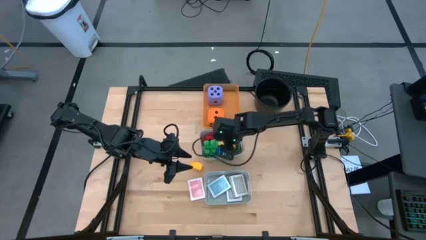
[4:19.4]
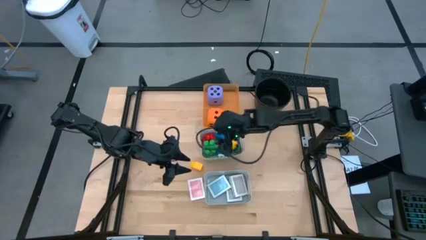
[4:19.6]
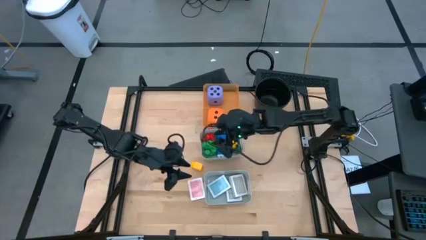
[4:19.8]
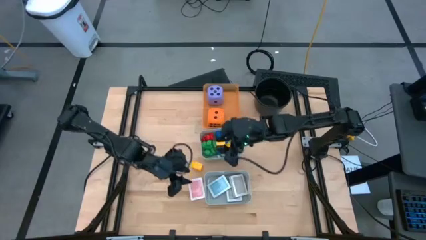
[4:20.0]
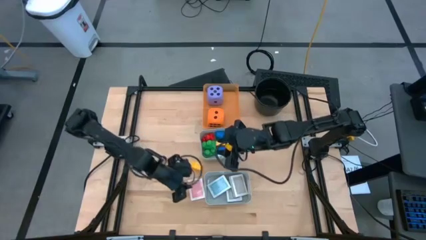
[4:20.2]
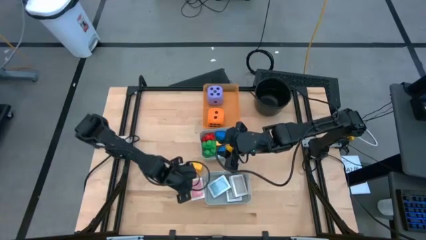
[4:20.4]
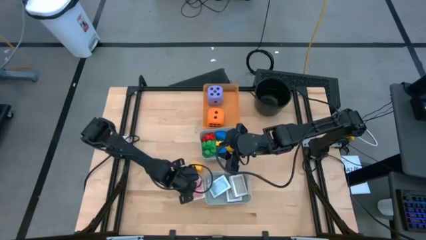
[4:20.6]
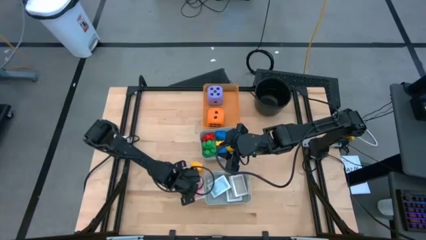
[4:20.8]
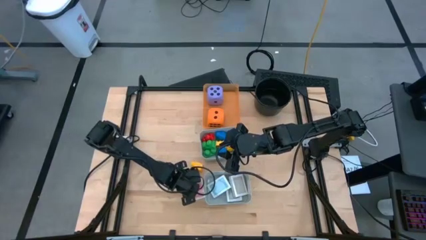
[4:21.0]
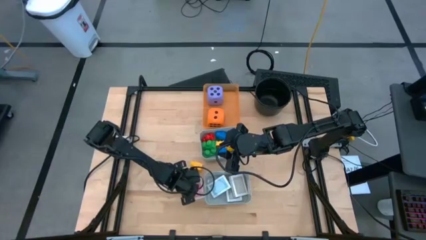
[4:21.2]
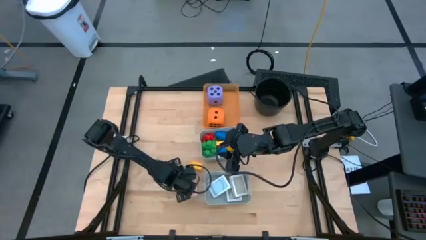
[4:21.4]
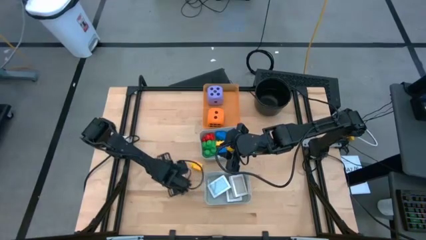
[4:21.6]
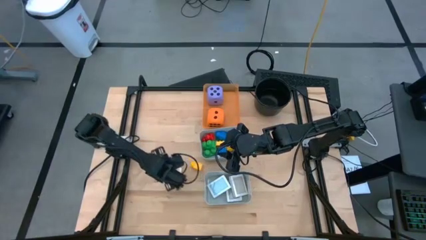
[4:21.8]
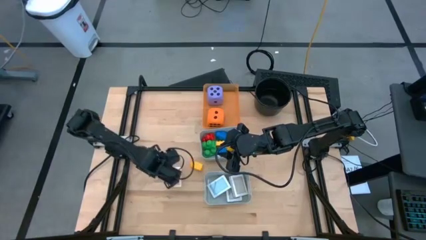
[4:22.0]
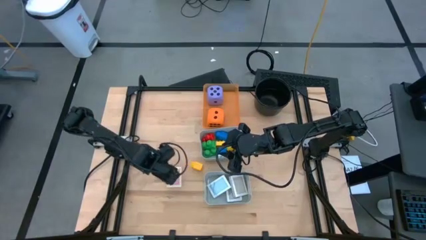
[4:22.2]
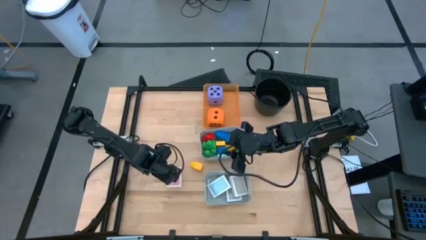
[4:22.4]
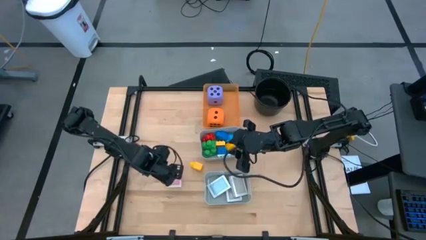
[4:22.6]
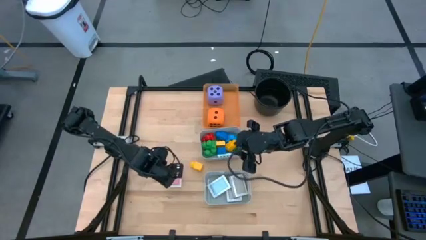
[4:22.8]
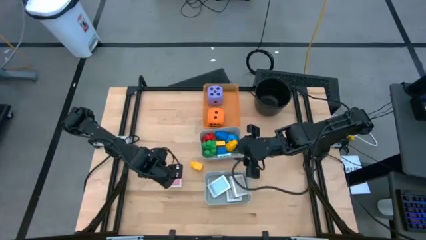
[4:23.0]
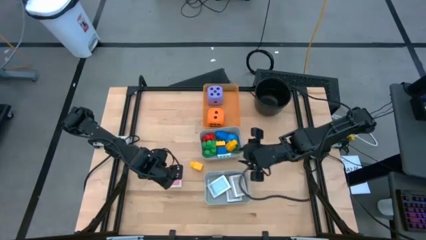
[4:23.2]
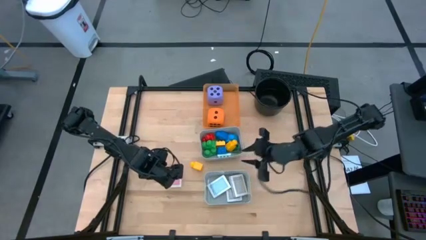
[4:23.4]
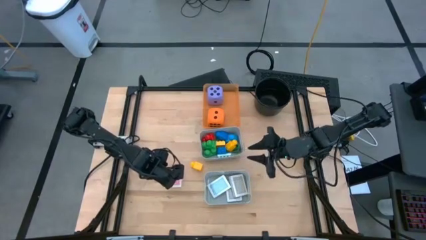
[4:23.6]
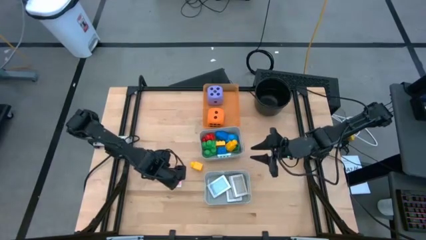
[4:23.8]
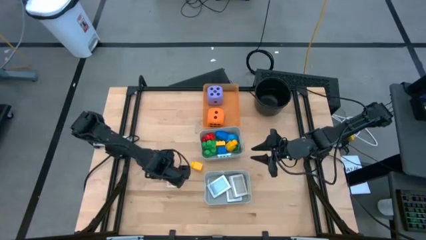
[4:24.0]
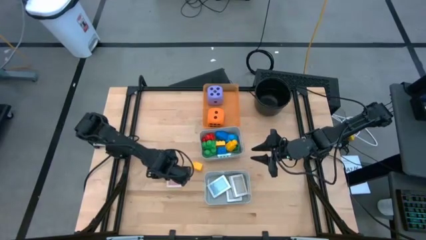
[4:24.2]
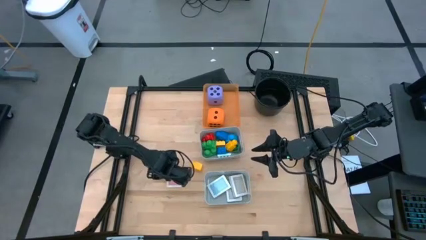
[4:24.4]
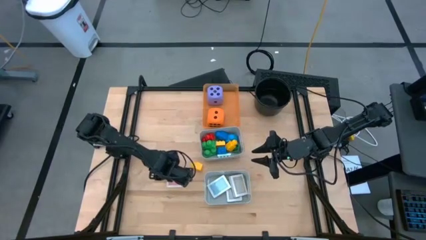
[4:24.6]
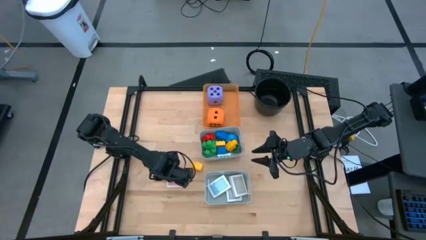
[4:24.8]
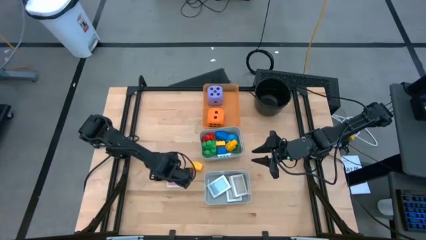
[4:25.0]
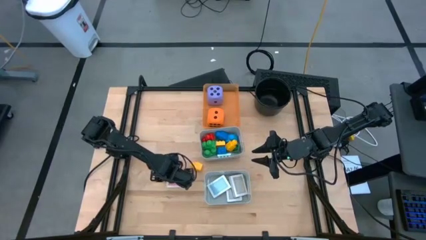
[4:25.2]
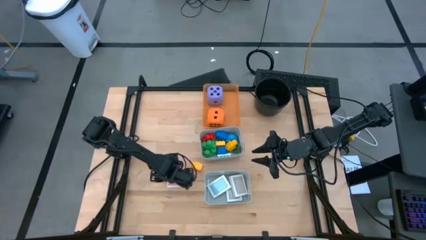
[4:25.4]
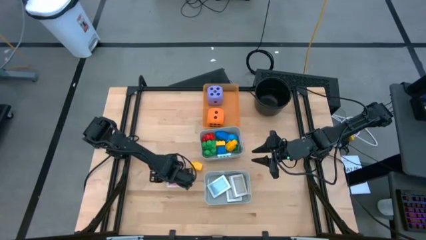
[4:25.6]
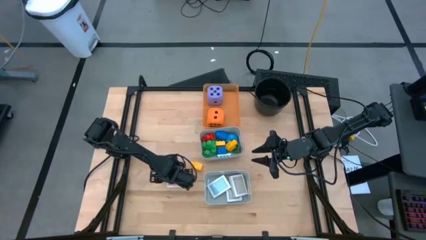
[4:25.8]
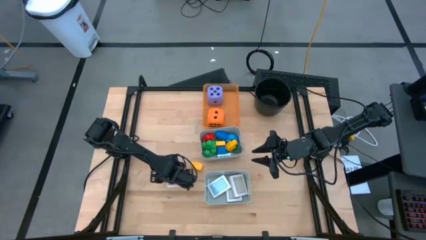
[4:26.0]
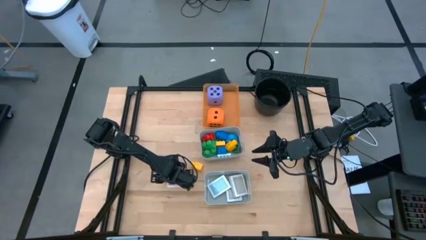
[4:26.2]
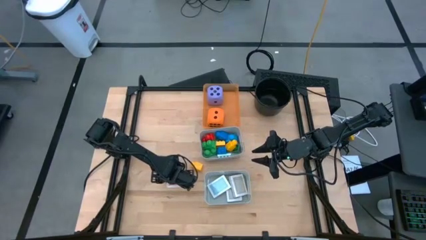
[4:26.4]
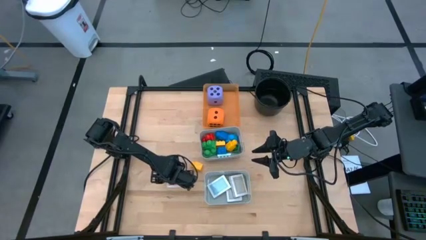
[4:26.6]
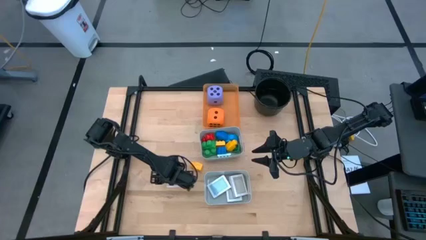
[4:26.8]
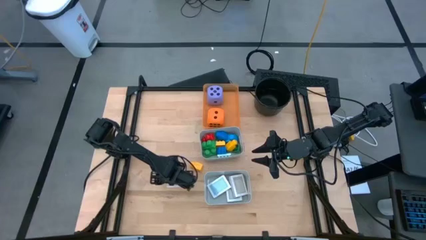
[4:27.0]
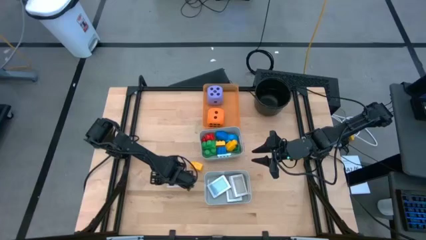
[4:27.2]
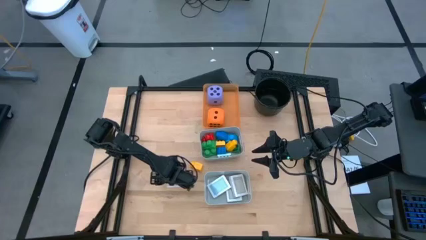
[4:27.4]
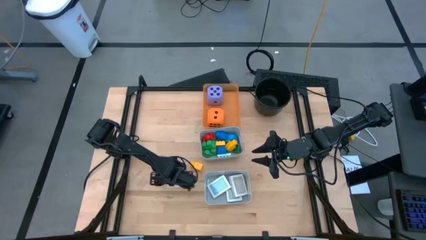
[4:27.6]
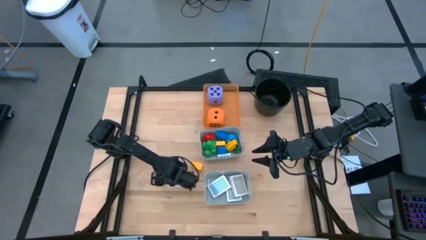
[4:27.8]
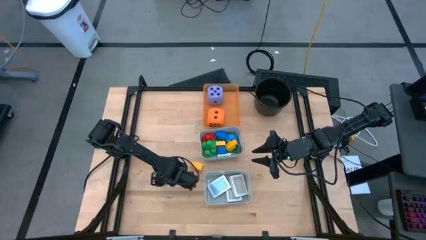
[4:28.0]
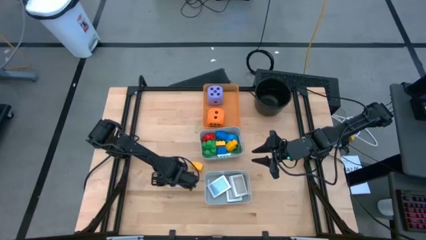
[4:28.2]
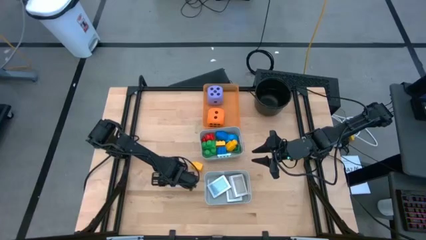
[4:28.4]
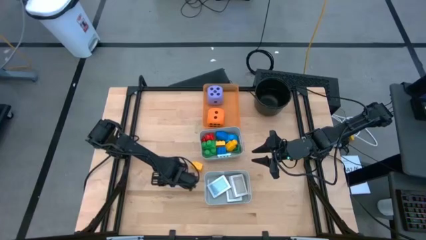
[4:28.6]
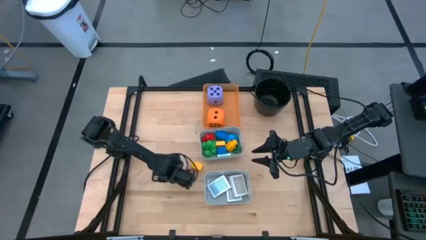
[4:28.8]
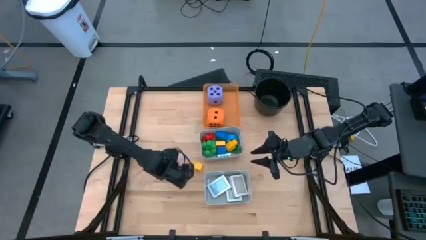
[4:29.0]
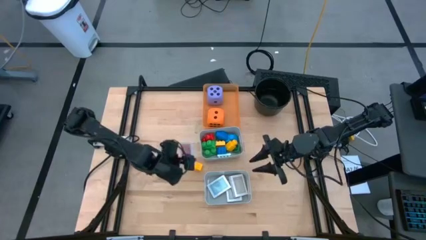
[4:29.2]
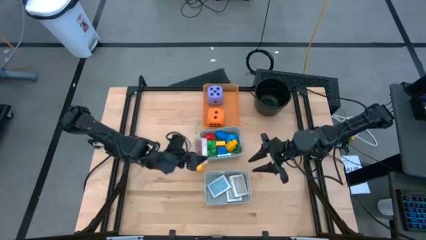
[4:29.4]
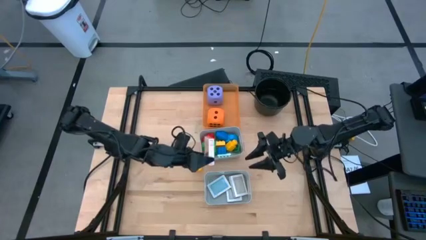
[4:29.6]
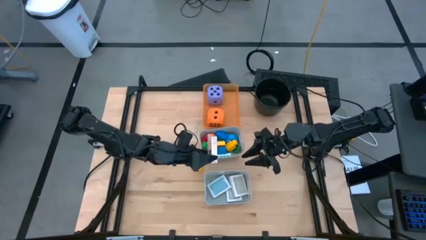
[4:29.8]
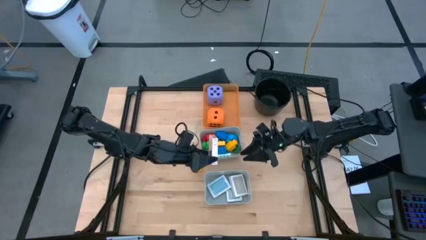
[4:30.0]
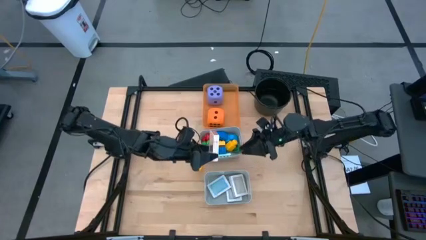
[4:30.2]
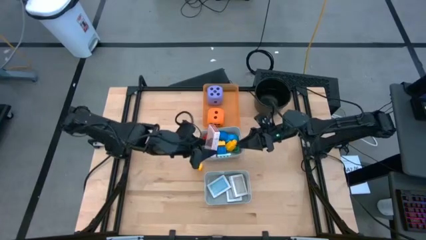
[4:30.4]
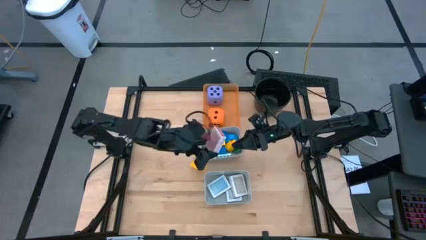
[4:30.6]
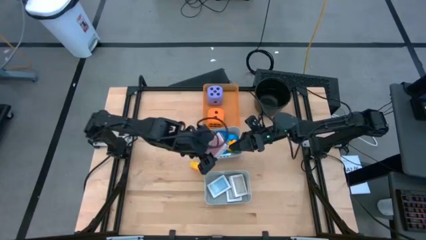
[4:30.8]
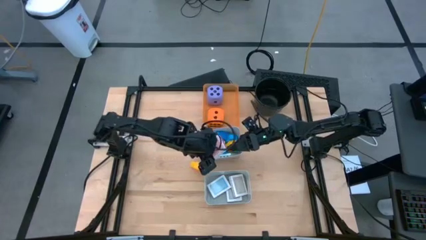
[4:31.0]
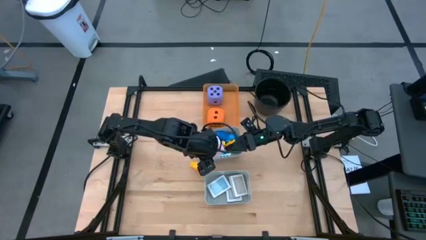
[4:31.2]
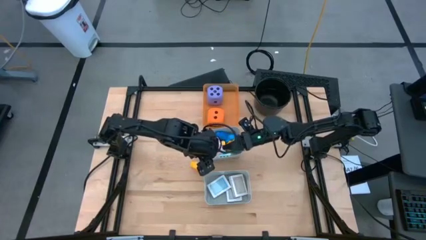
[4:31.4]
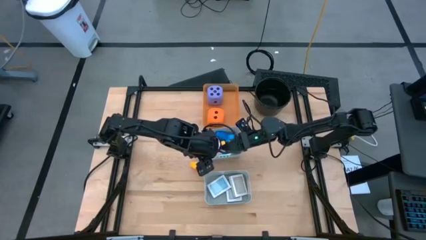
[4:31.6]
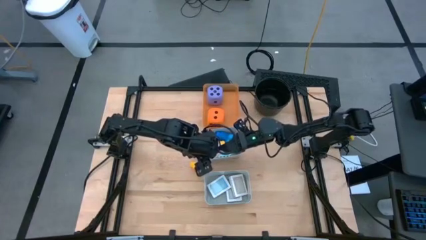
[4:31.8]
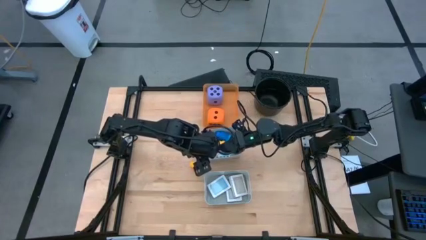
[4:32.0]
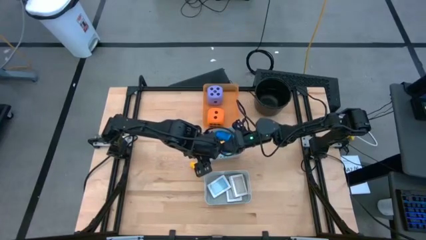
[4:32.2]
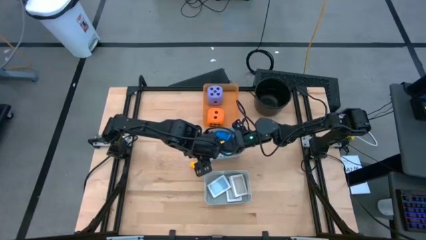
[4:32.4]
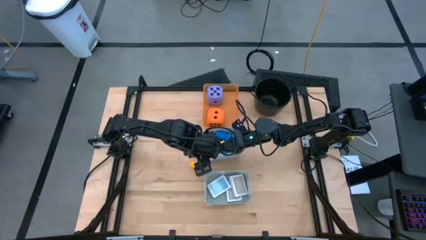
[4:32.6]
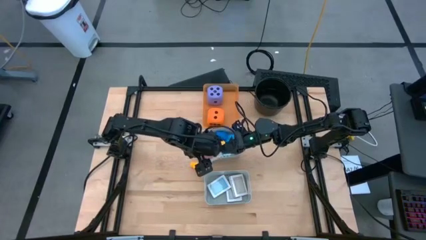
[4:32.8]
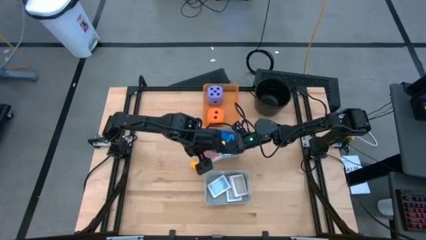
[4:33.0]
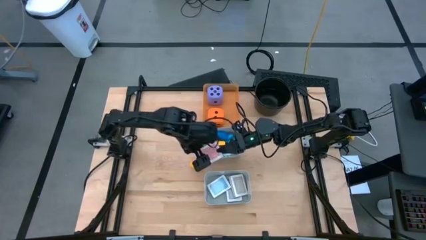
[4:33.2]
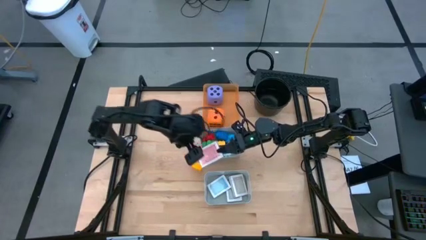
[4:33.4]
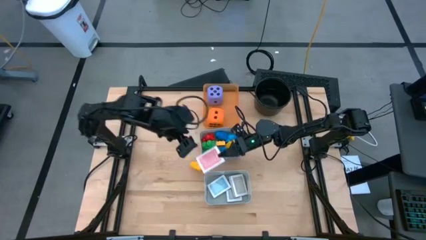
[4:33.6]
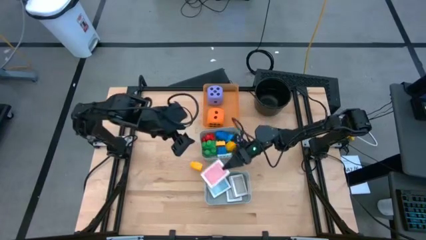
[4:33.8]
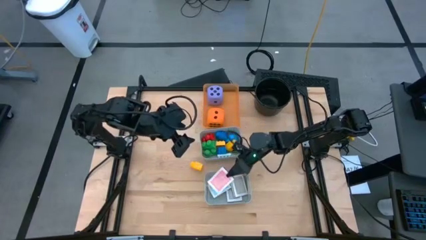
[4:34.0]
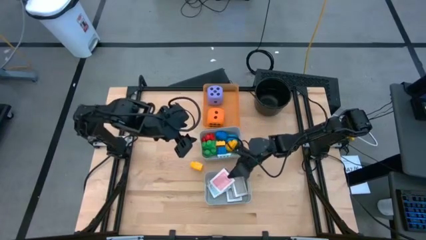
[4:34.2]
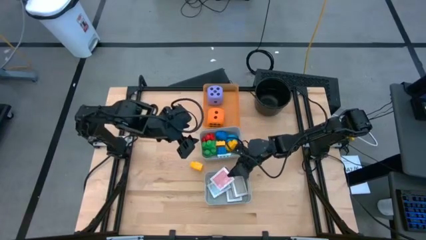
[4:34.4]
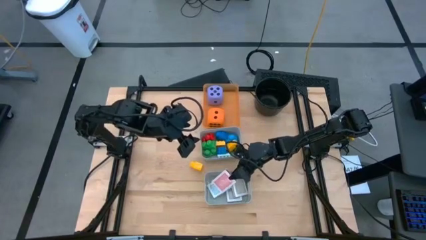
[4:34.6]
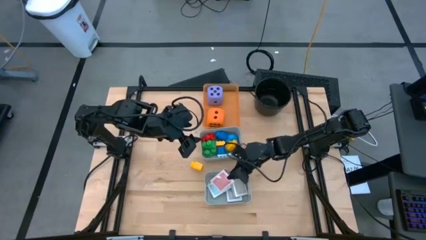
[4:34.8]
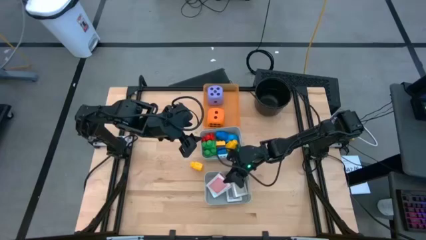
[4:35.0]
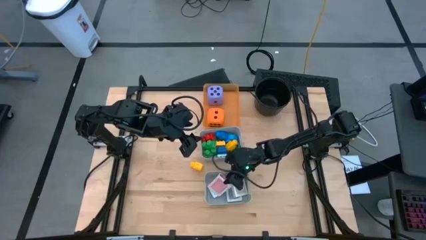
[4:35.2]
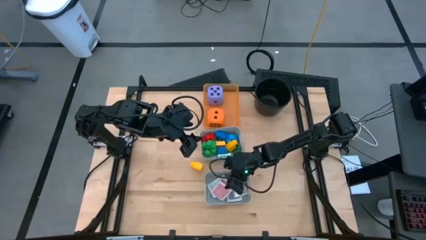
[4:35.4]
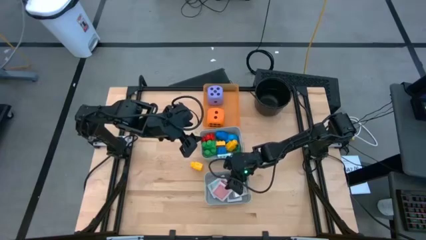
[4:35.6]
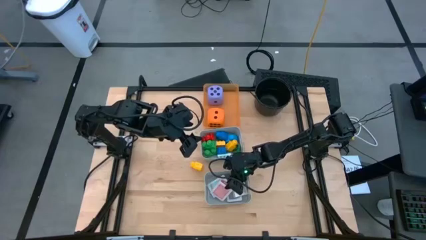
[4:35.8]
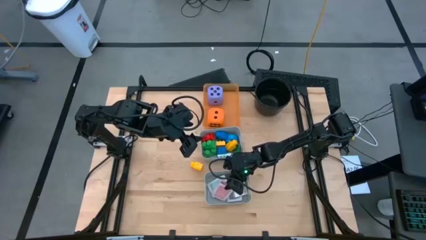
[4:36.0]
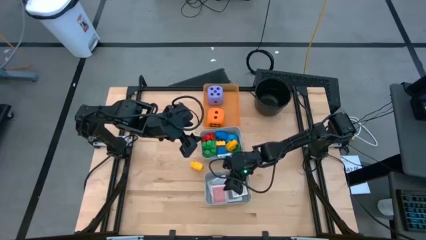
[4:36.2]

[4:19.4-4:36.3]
Task: Pick & Place Toys
Put the red card pack into the bottom gray bin
